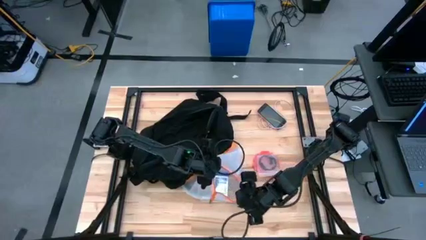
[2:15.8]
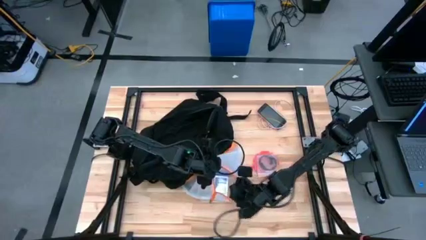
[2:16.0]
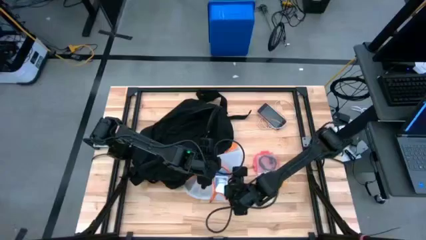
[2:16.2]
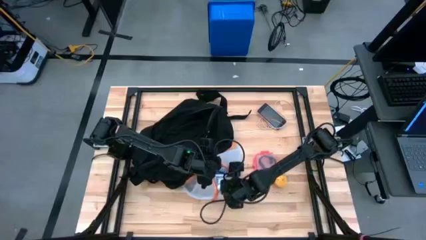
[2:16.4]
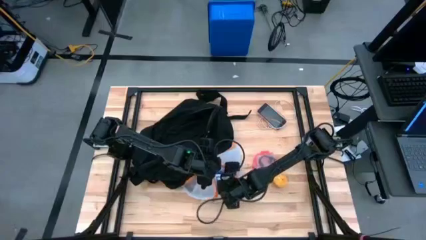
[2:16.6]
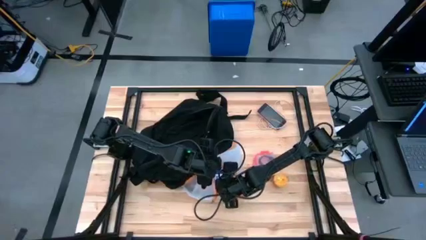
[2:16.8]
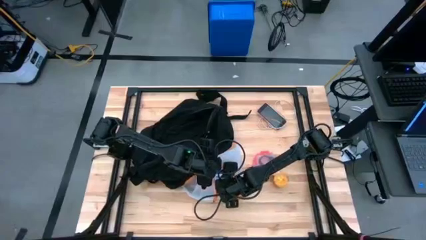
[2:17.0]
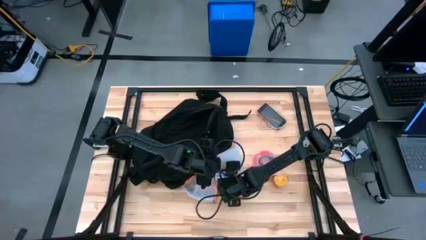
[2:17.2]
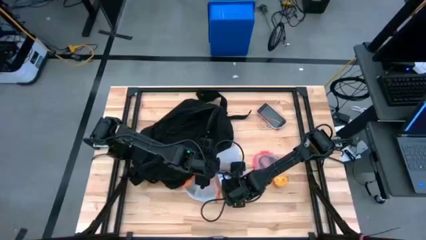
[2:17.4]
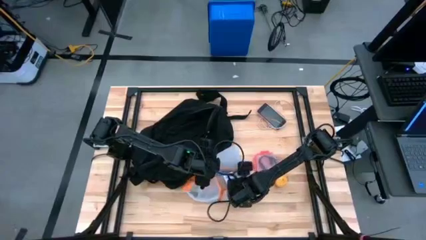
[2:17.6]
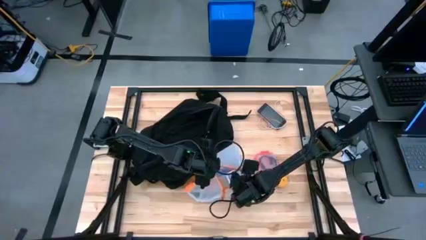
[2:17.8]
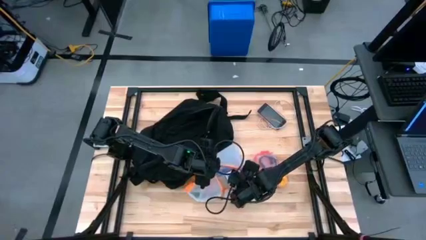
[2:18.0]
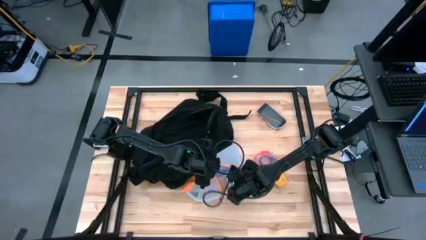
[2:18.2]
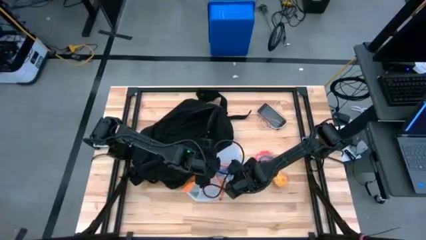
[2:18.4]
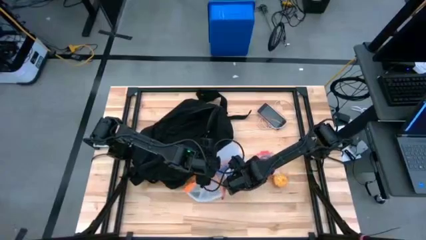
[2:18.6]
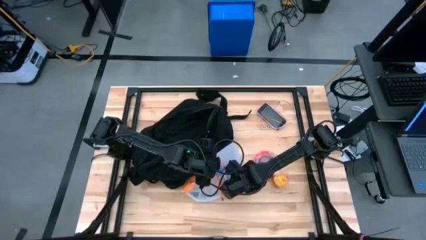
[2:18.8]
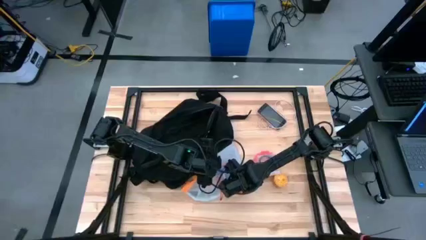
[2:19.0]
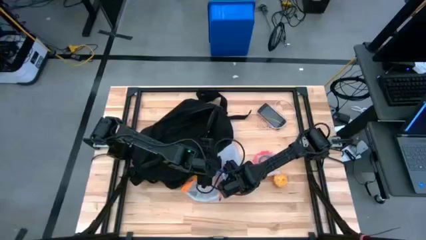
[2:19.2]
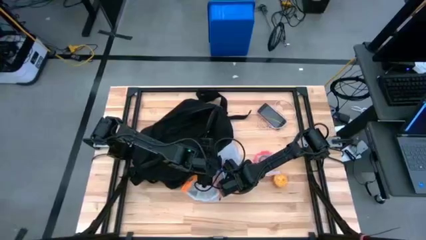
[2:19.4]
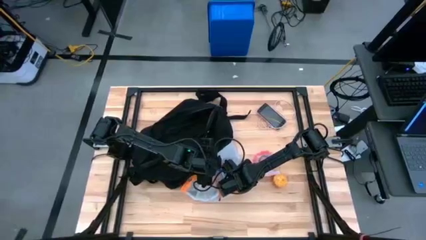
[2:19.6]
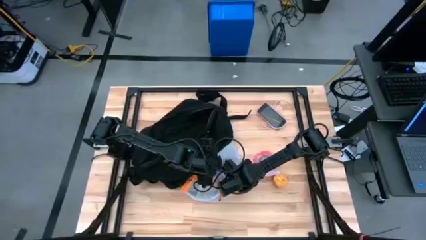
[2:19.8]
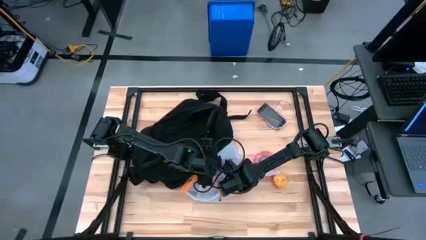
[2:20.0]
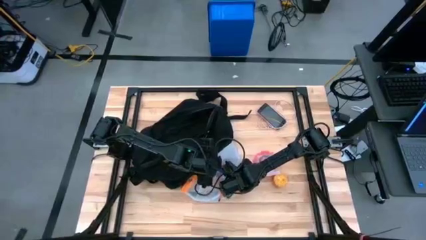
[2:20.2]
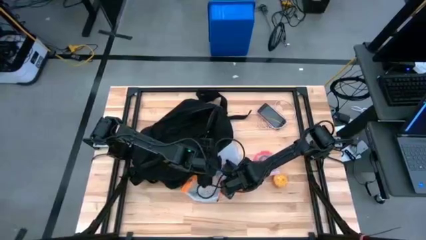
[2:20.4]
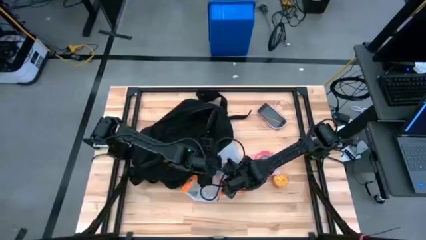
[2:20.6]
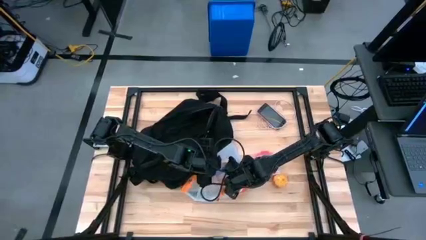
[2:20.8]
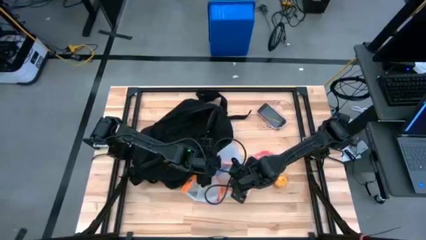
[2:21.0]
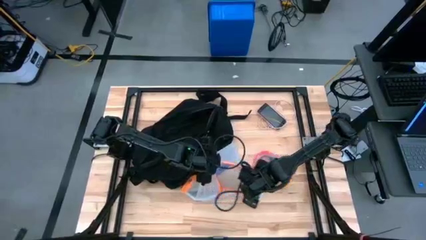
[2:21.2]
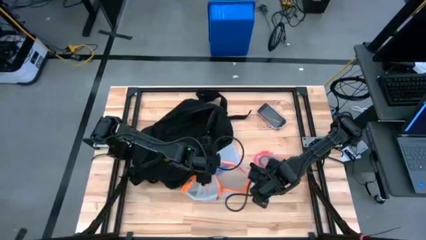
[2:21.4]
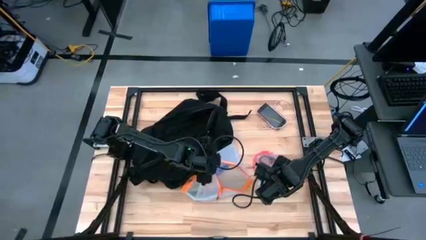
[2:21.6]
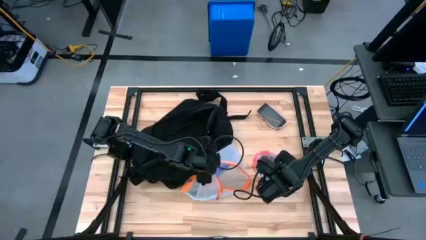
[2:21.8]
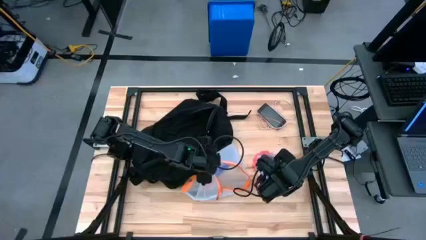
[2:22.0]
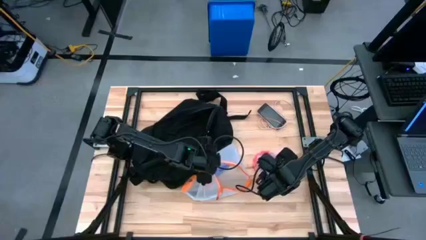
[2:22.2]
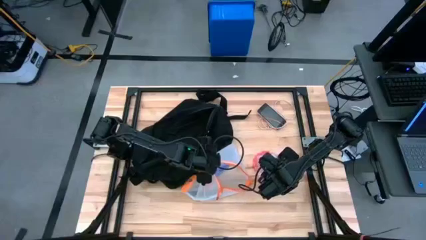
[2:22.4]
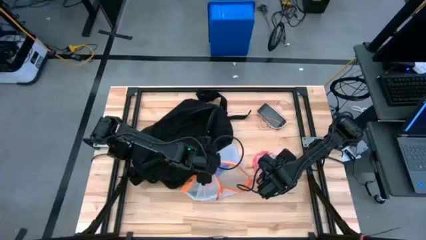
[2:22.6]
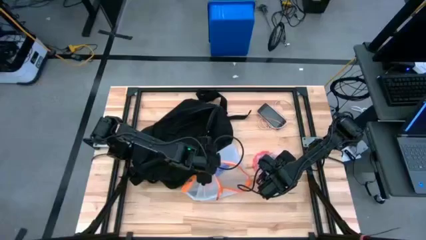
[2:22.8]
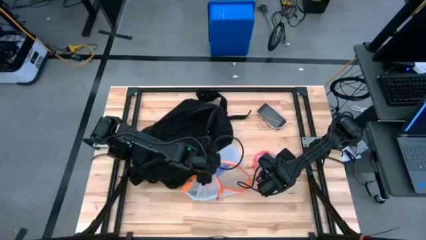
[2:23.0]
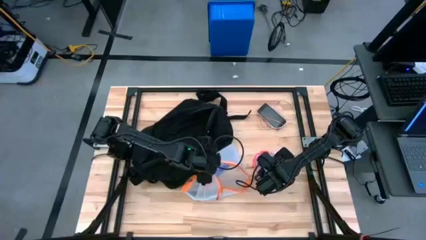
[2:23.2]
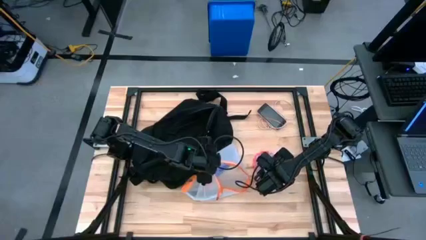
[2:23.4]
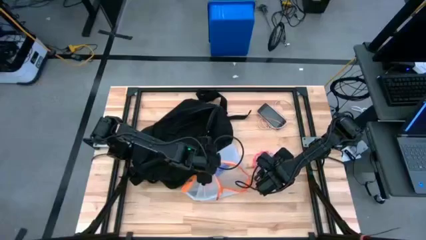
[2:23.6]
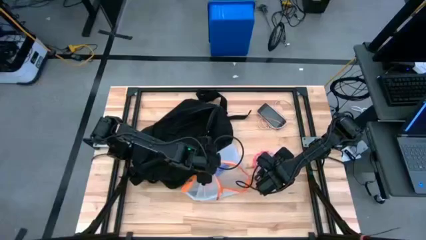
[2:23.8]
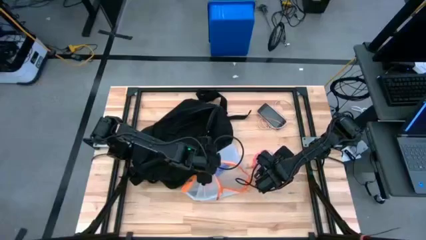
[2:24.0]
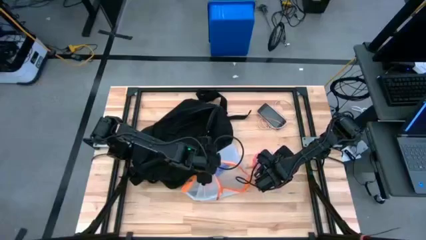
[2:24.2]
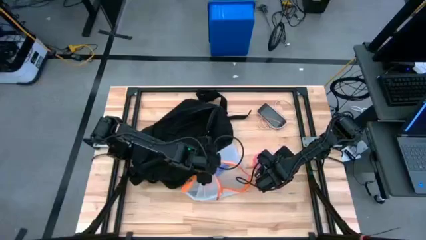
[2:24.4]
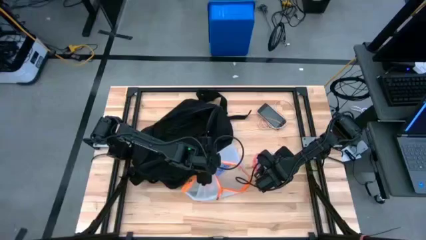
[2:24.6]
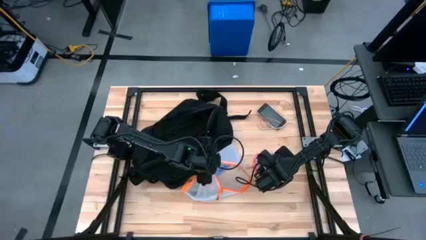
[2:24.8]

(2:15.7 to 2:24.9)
Task: Unpack backpack
Remove the blue game card from the orange zip bag

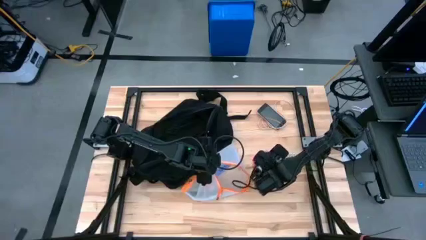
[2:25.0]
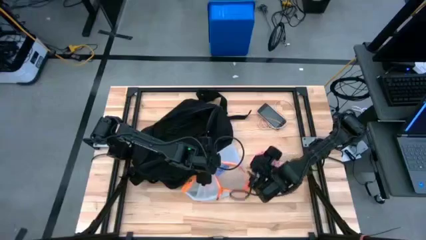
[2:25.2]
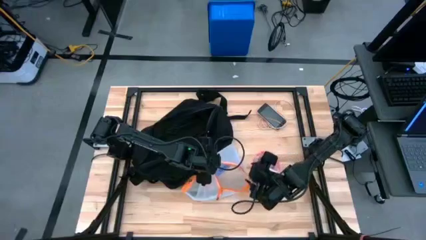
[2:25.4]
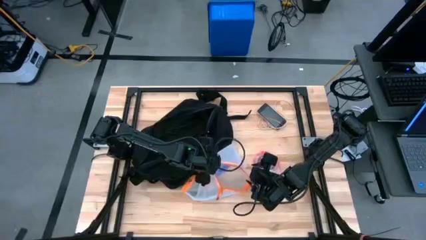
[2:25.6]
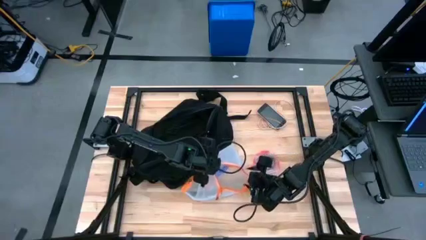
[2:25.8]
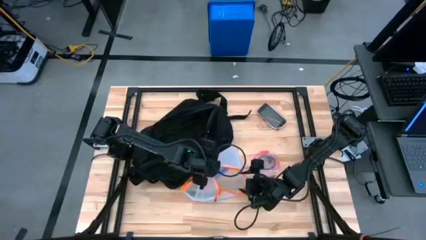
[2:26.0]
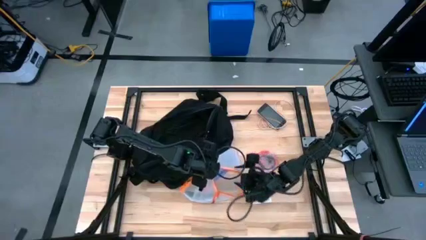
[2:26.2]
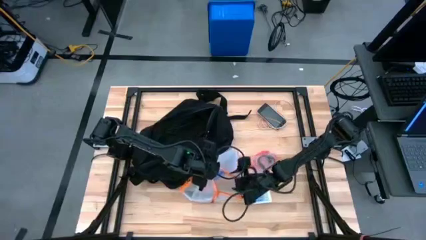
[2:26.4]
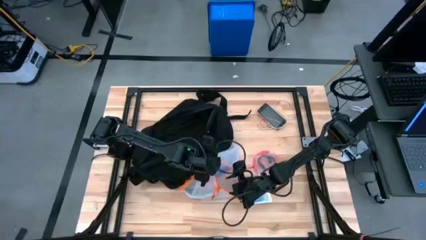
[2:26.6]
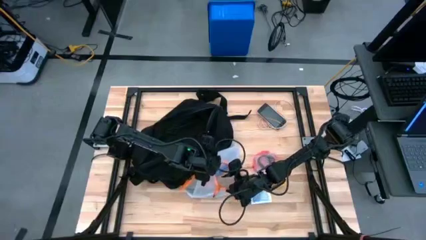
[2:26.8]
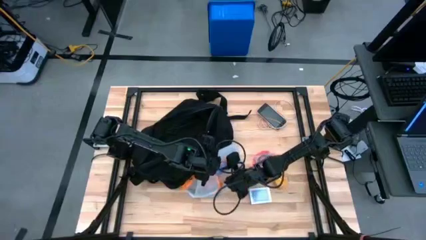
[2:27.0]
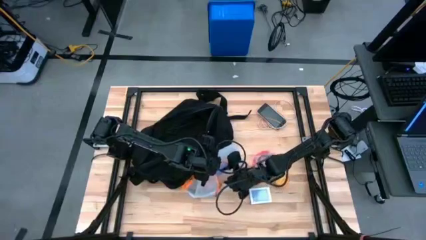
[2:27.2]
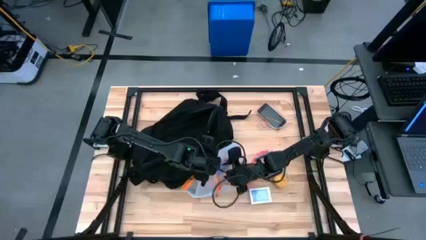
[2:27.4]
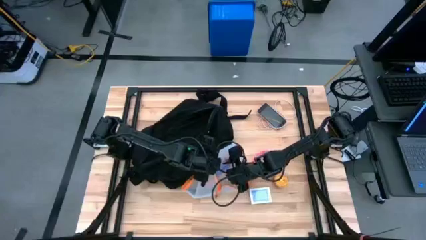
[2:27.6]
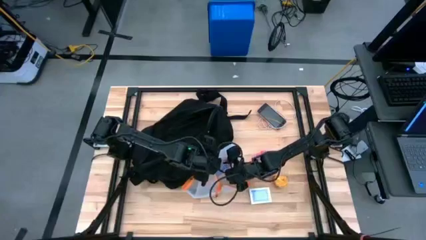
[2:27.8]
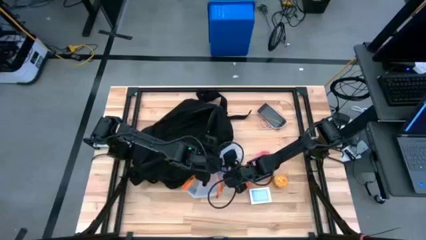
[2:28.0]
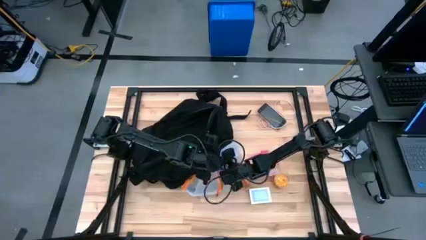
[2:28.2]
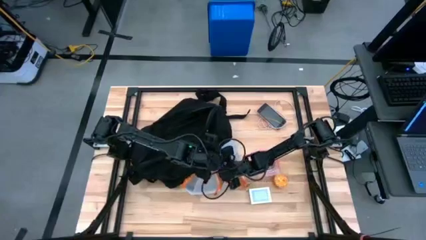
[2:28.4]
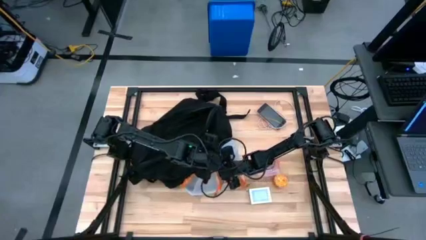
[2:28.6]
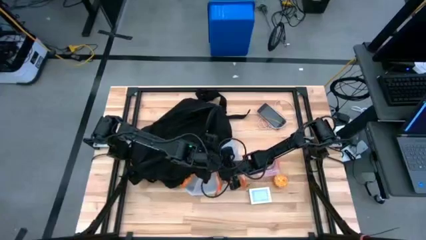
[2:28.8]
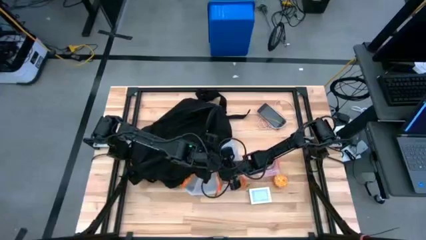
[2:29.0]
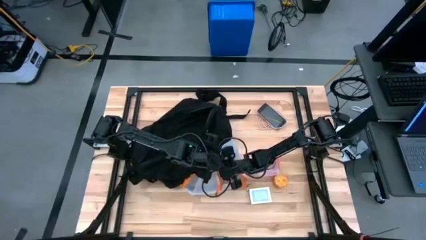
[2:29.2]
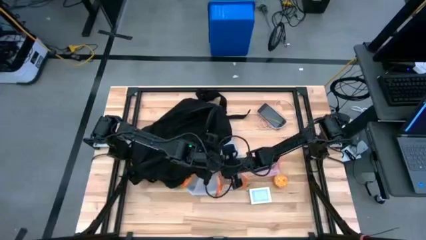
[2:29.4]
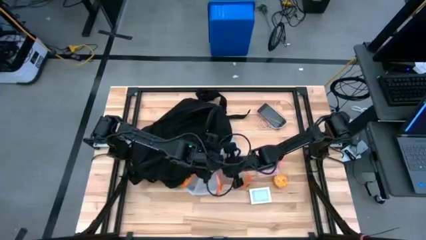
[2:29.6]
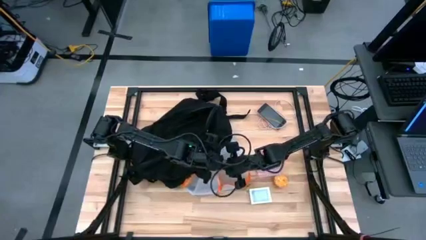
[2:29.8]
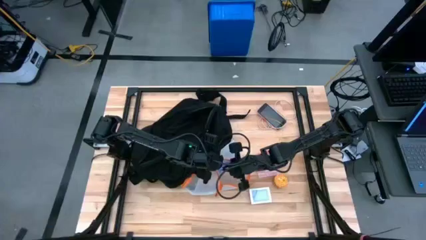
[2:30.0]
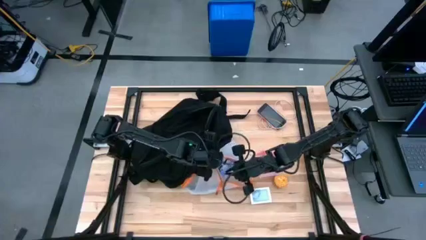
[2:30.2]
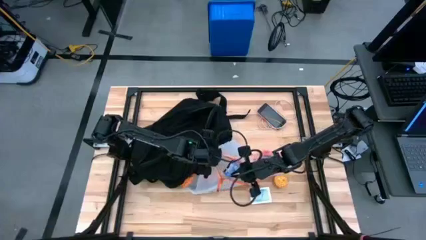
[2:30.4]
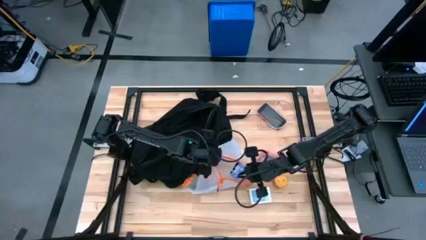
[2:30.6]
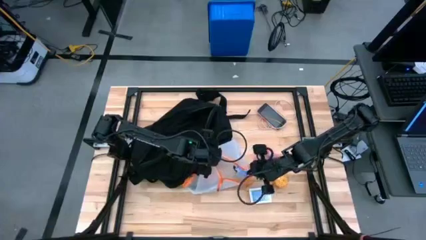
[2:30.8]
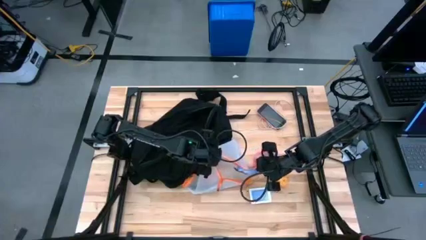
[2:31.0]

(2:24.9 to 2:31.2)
Remove the blue chocolate bar from the orange zip bag

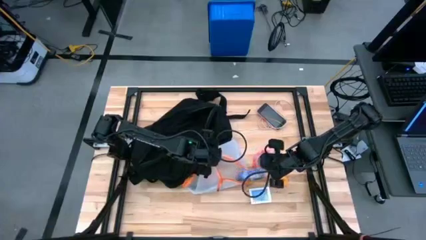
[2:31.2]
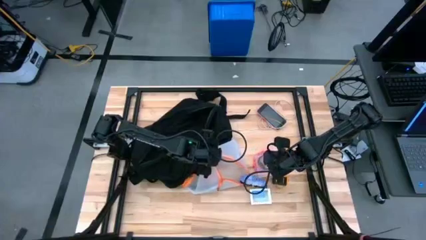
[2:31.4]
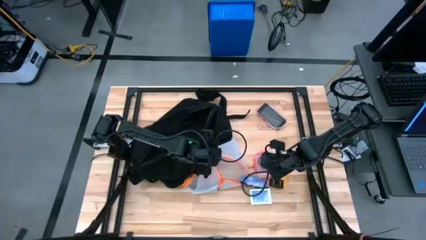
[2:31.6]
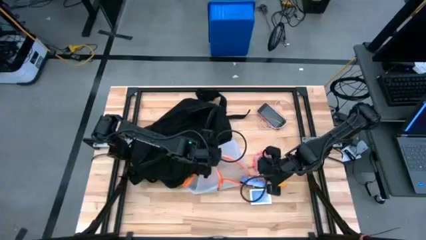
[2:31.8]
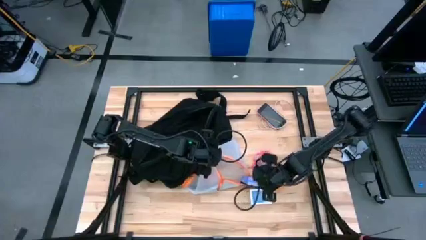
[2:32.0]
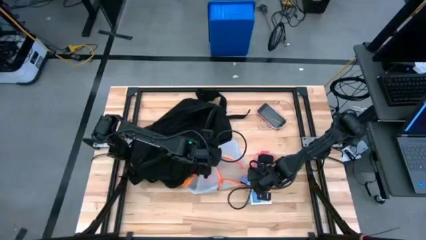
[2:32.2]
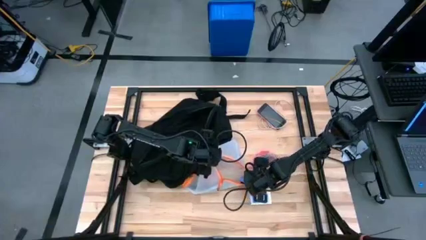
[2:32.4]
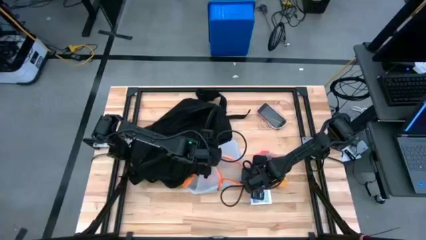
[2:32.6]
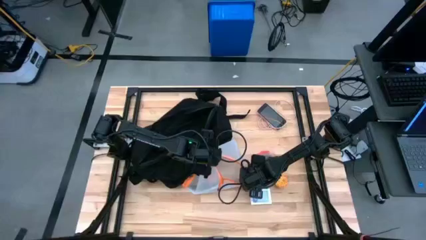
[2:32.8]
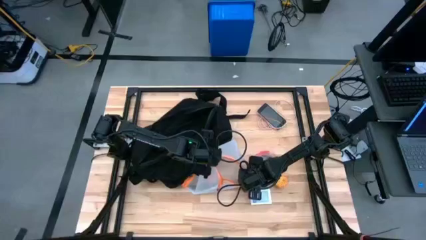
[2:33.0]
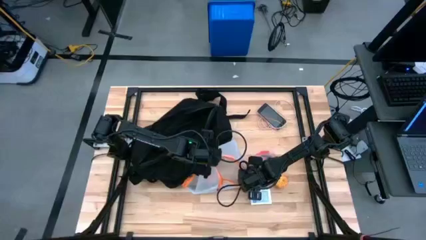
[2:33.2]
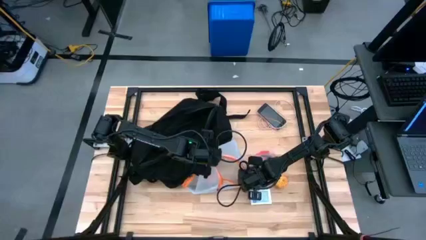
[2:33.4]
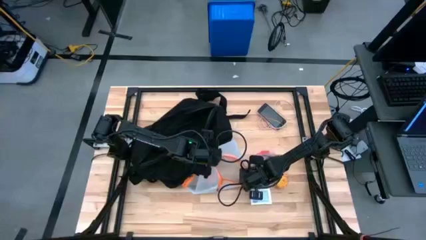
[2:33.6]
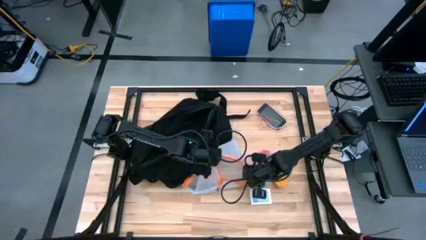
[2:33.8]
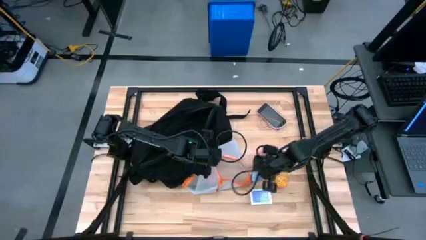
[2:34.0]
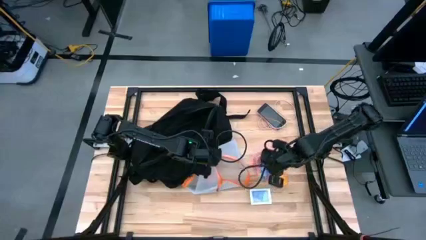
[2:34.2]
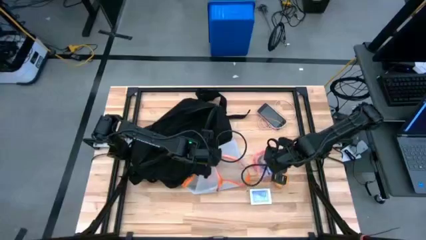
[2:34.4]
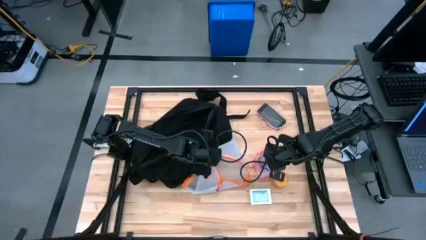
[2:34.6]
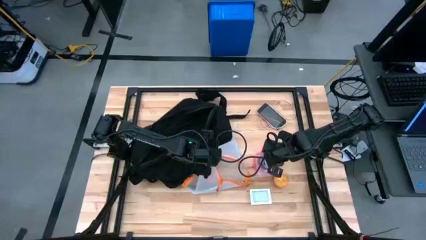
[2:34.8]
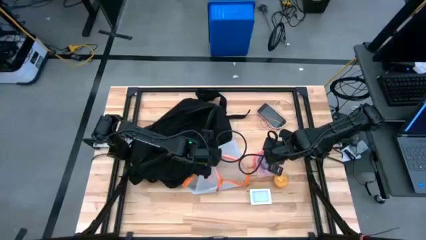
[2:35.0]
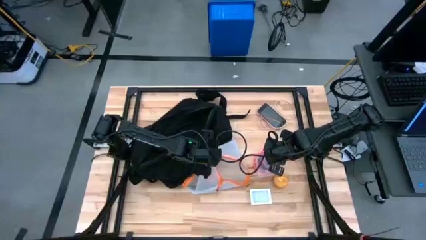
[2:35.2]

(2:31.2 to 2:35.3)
Remove the blue chocolate bar from the orange zip bag
